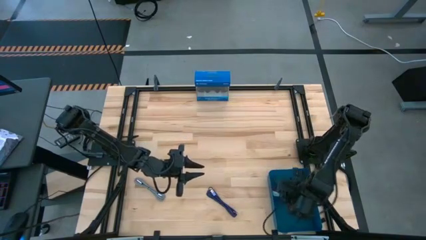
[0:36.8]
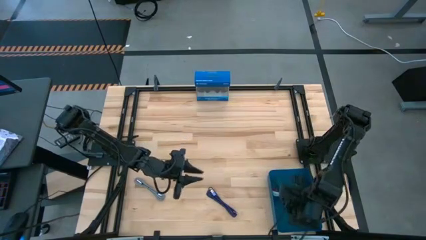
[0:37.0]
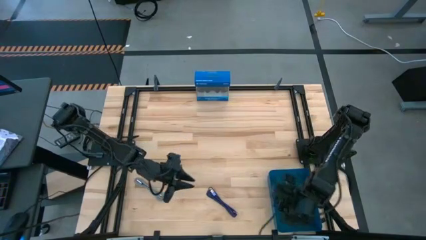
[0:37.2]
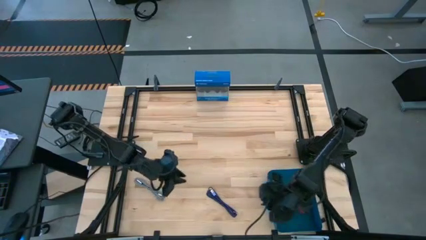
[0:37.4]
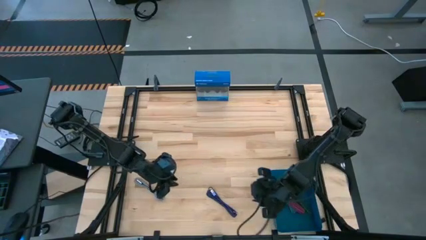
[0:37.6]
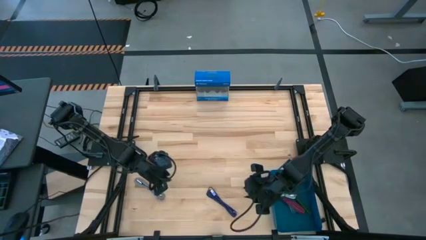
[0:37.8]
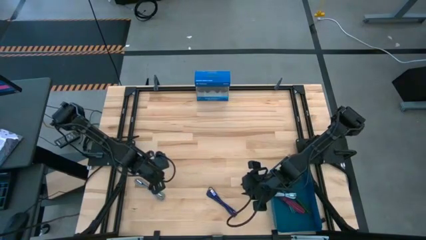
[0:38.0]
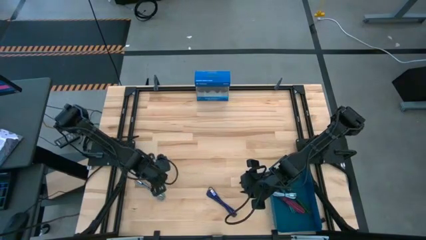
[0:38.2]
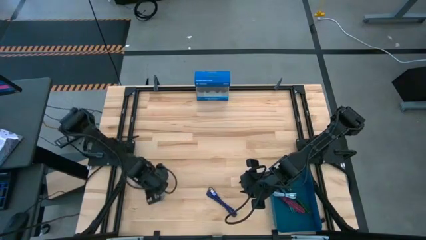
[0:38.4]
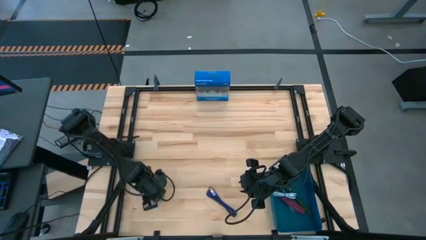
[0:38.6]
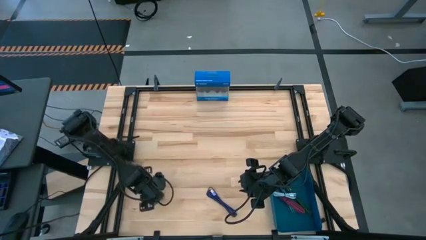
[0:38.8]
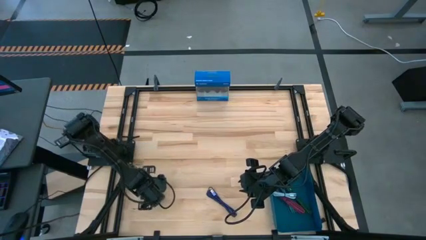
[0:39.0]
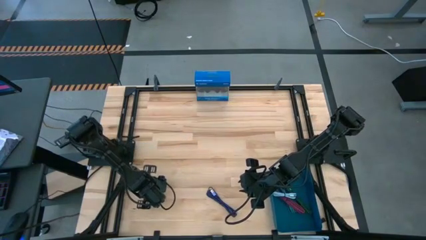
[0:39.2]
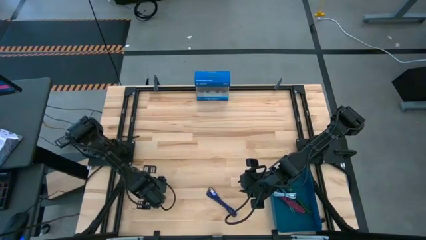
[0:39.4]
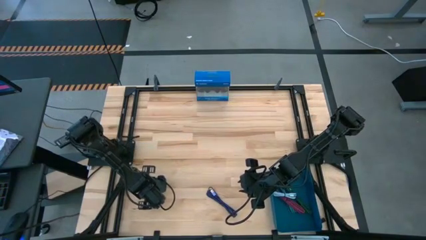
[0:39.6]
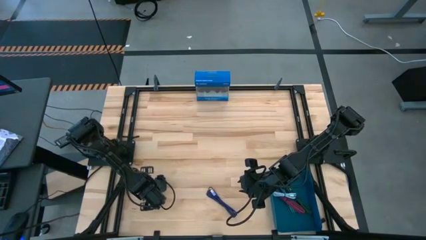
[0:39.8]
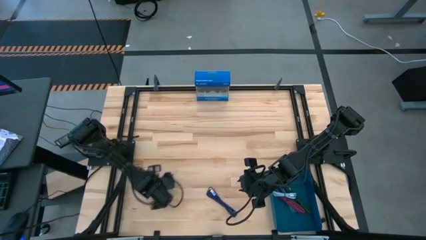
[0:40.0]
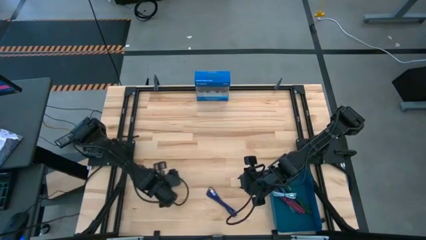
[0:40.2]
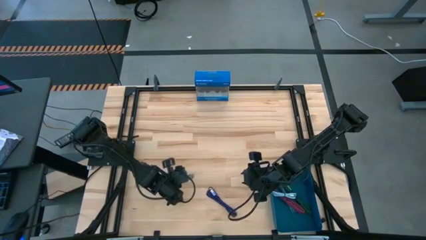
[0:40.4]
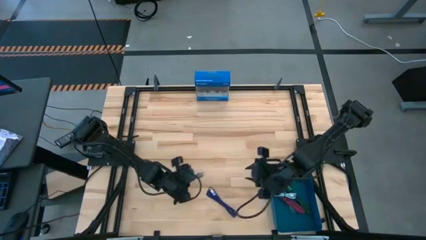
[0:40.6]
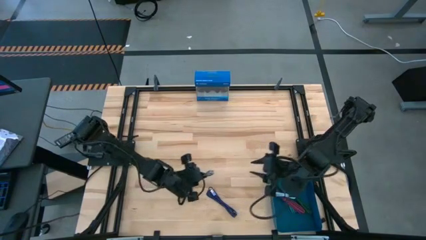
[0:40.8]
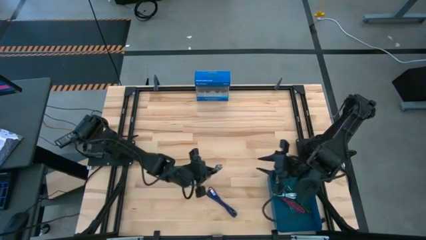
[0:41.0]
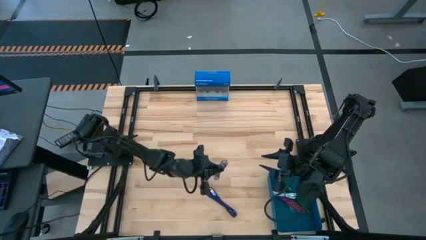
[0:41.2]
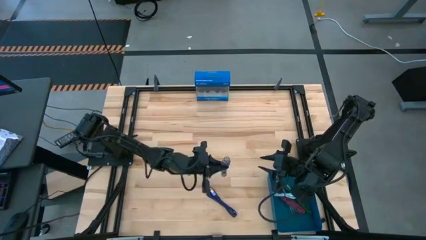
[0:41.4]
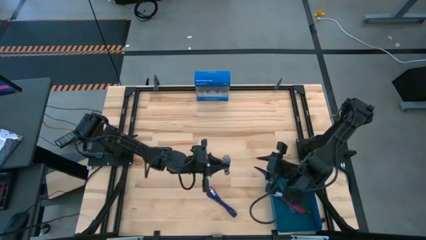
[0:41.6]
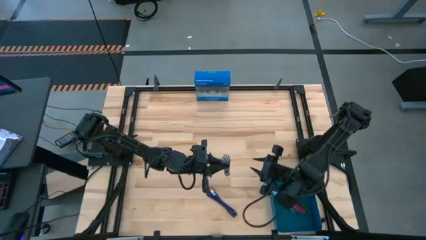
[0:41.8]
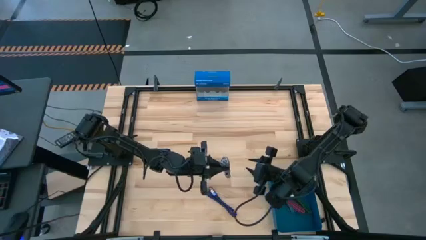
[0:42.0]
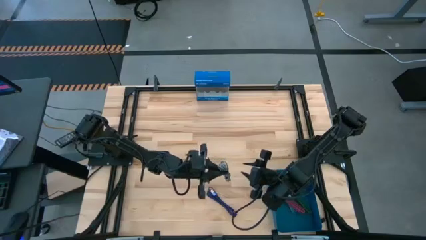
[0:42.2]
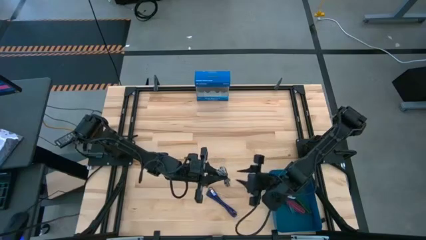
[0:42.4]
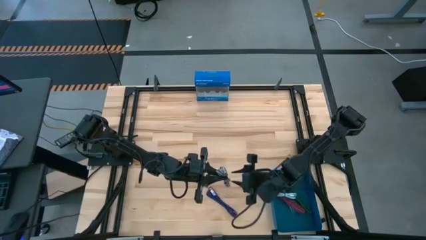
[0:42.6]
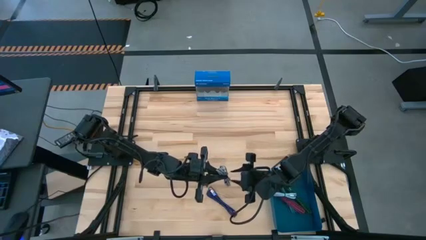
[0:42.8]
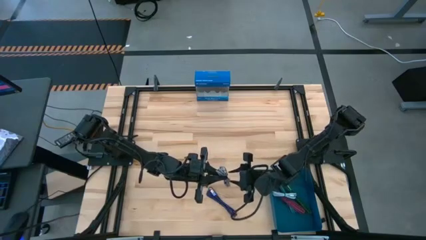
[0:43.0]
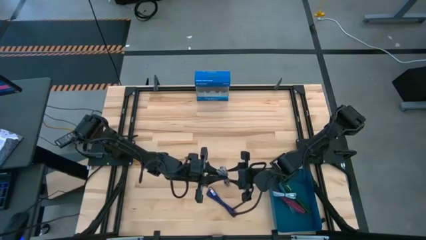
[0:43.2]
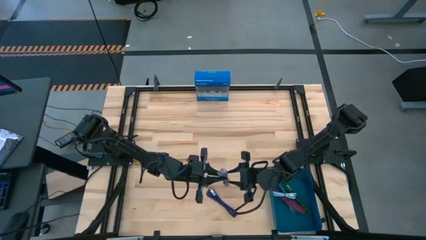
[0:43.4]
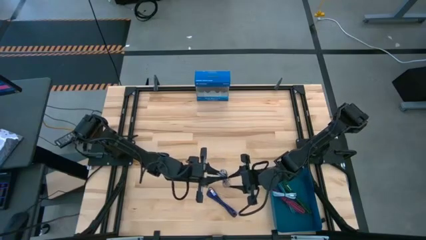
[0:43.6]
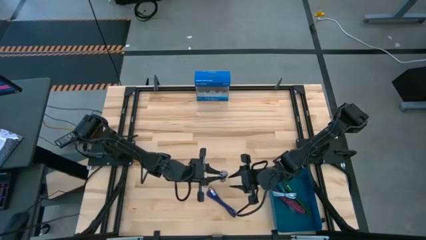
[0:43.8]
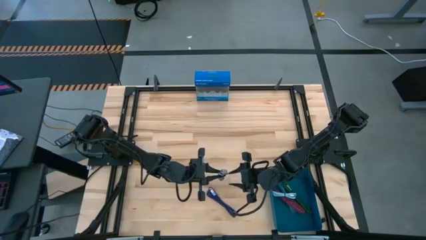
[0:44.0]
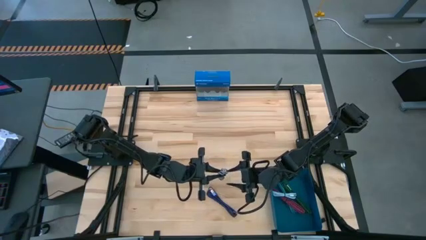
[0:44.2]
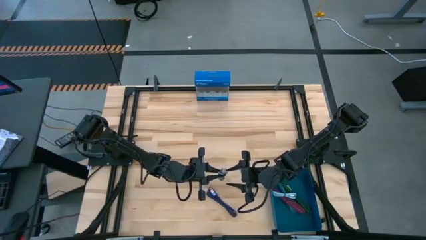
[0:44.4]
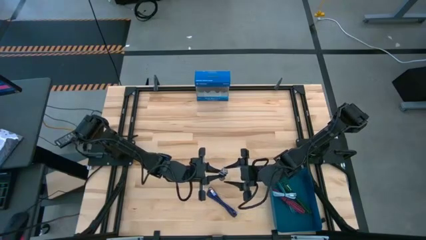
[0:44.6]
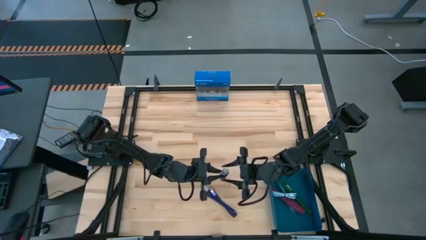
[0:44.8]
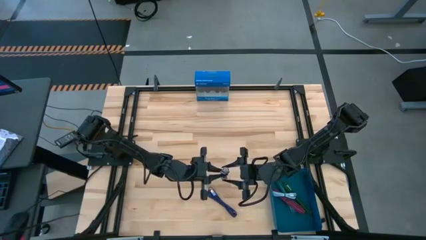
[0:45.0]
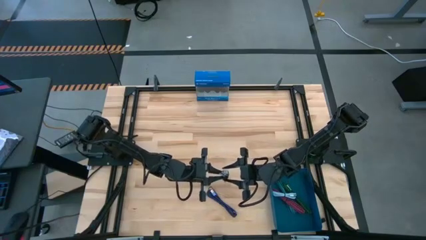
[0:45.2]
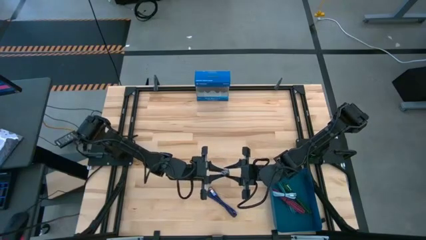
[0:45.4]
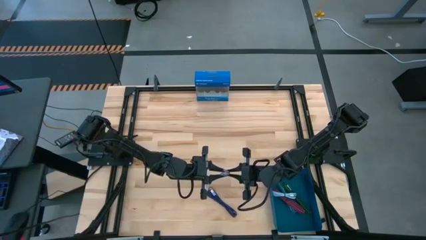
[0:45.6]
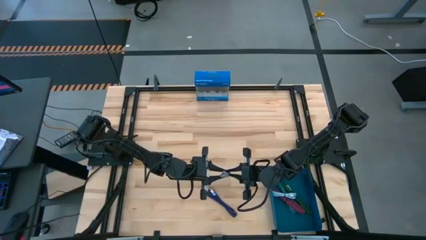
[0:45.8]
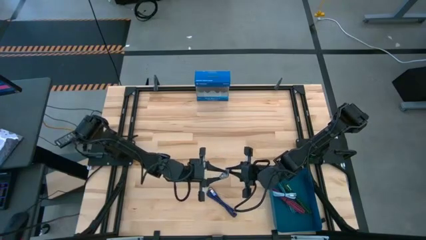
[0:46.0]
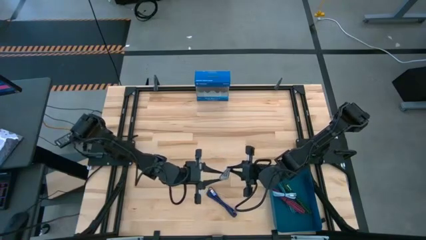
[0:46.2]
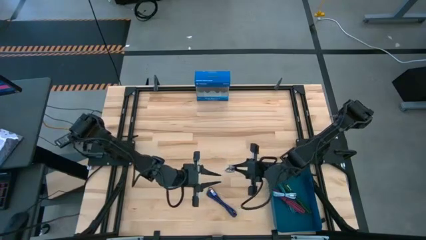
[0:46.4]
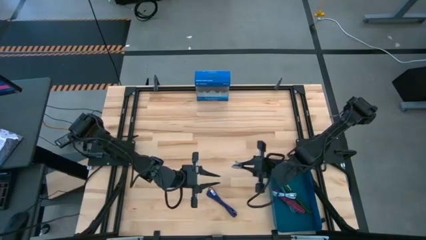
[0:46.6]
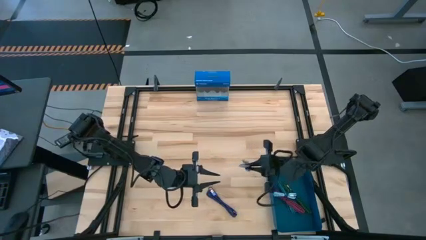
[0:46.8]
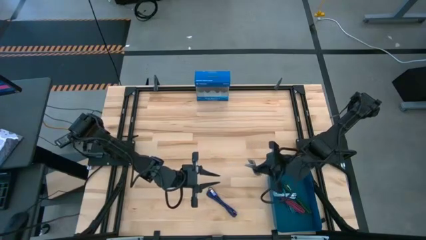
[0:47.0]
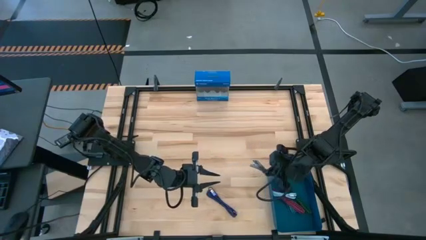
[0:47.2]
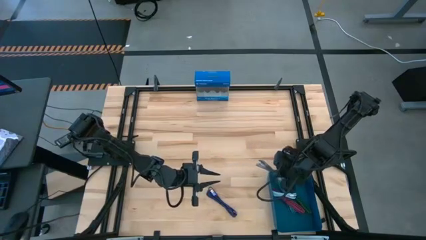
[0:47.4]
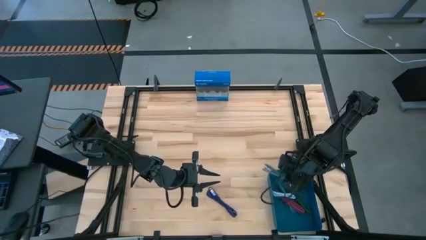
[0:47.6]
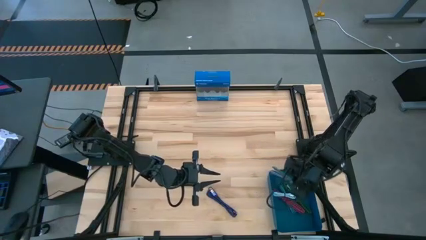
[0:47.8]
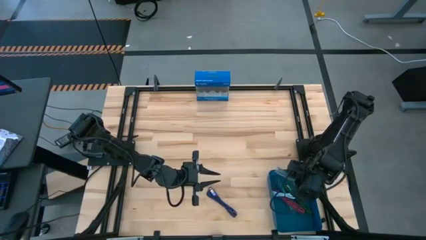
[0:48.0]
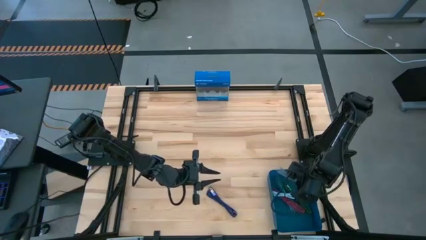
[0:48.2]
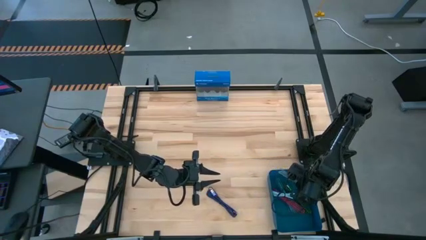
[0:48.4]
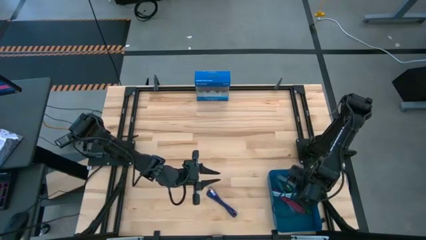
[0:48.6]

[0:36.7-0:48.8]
Task: Pick and place USB-C Cables
Put the white USB cable into the blue bin

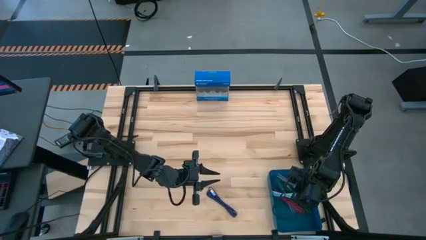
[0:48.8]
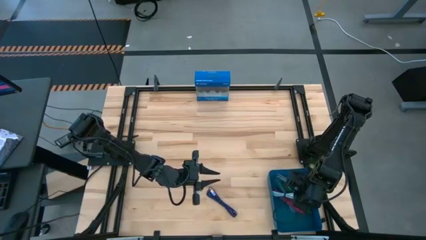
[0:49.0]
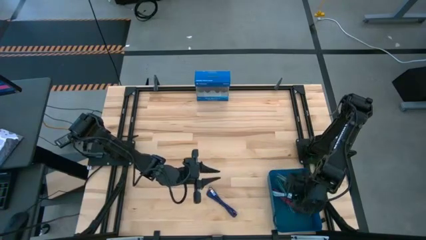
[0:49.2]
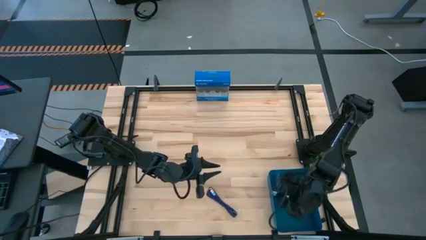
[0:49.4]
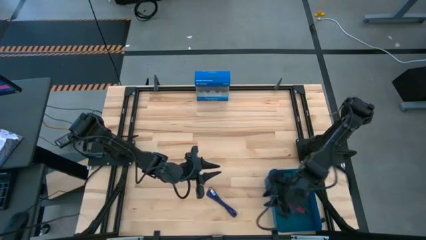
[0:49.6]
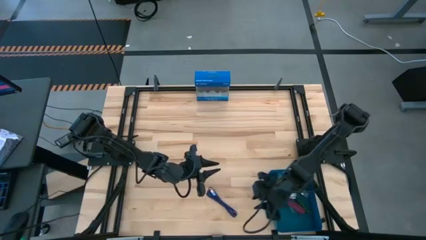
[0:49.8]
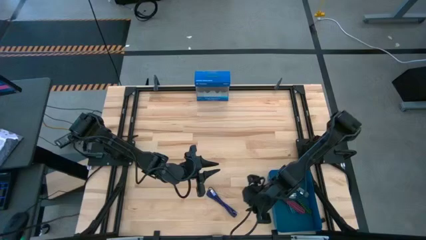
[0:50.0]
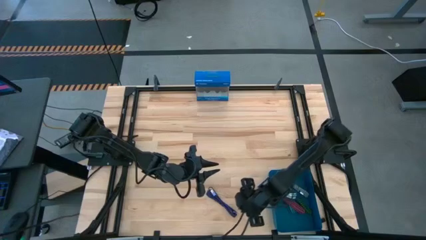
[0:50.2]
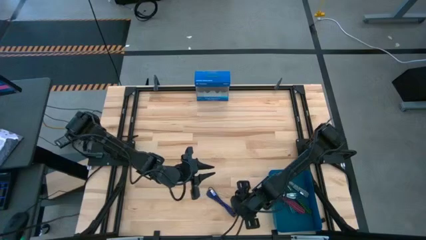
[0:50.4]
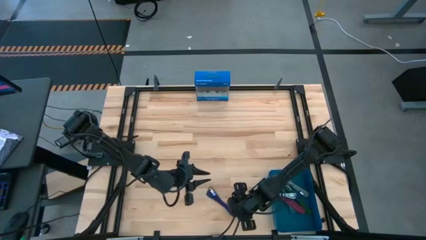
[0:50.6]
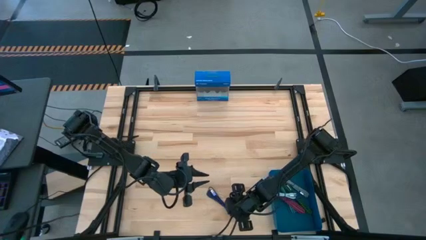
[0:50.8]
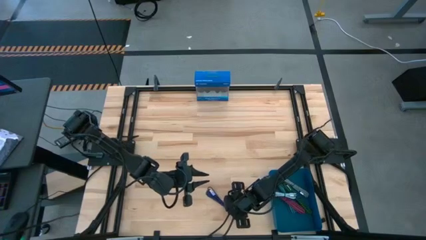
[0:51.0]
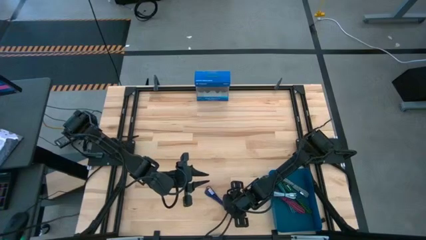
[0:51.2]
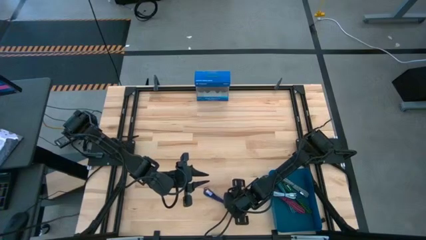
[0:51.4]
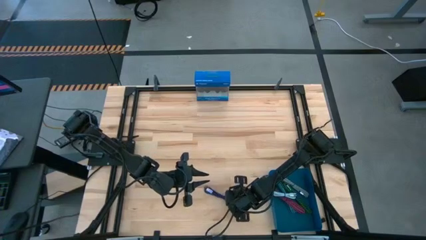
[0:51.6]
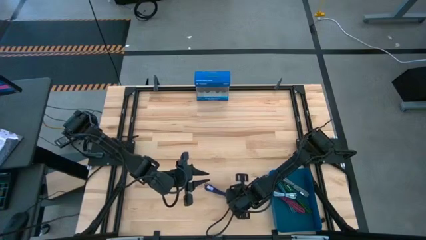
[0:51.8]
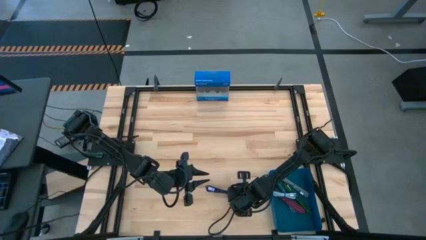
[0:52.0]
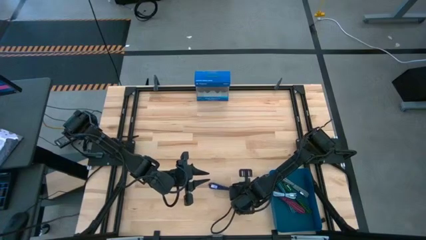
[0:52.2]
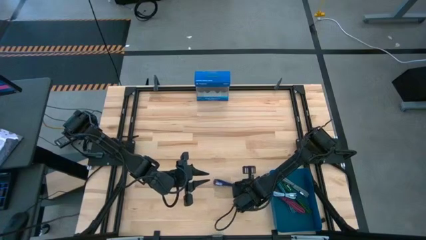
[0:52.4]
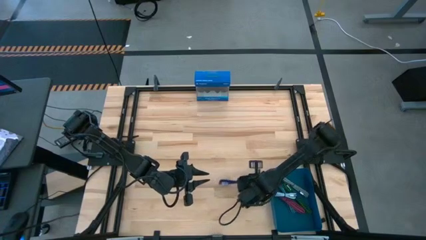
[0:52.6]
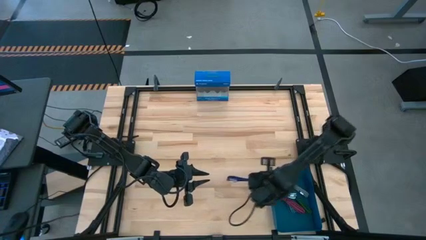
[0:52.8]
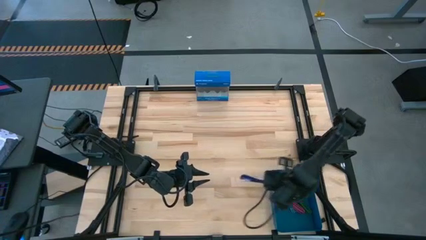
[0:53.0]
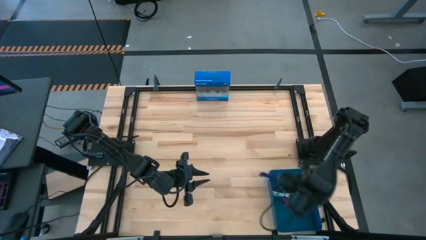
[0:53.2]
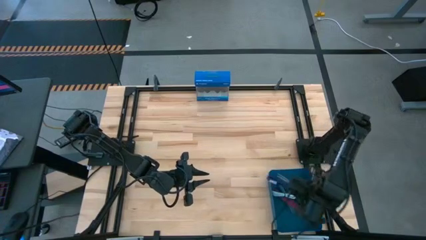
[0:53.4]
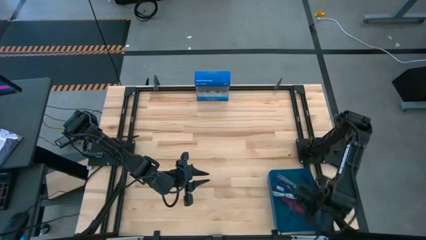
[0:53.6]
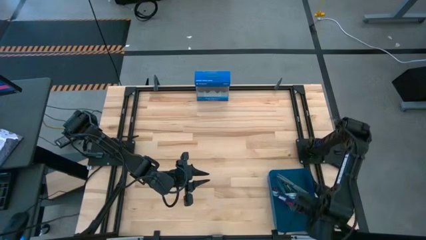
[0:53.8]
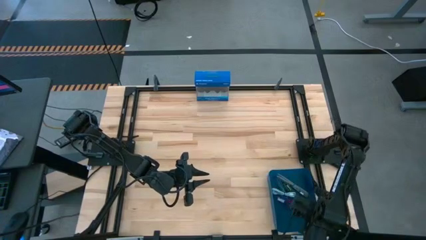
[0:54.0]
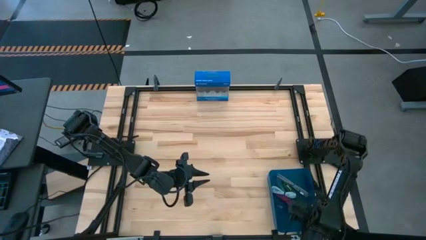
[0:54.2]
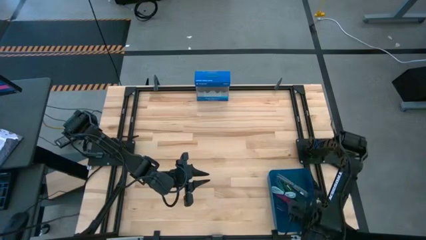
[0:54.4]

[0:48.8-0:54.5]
Put the purple USB cable into the blue bin
